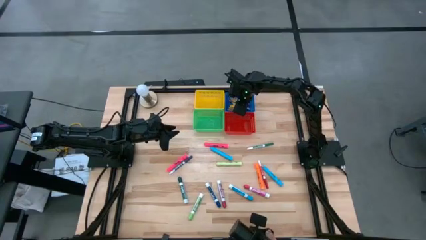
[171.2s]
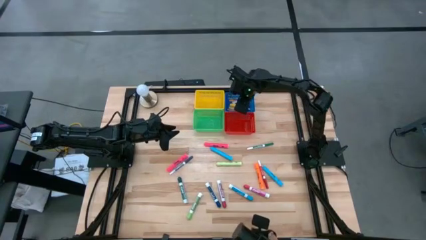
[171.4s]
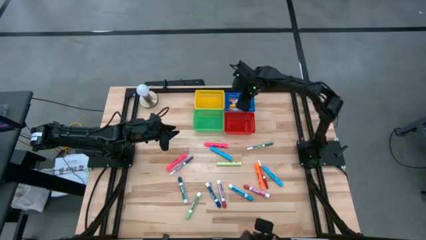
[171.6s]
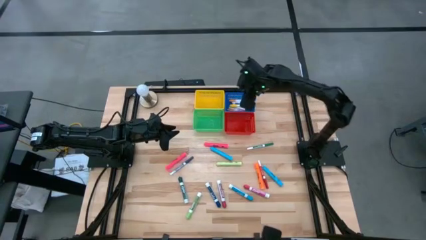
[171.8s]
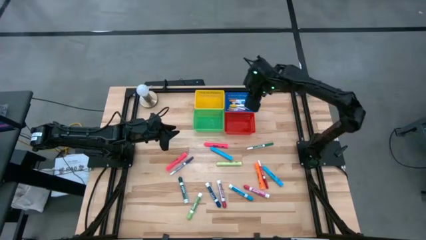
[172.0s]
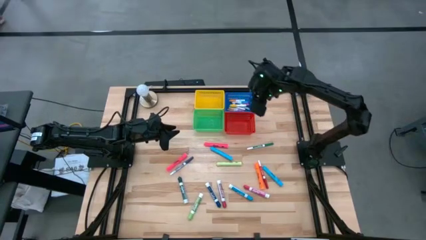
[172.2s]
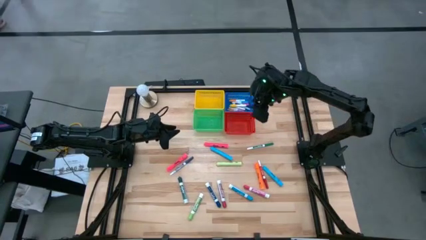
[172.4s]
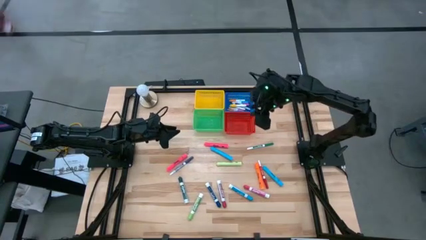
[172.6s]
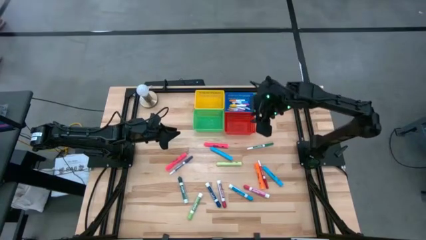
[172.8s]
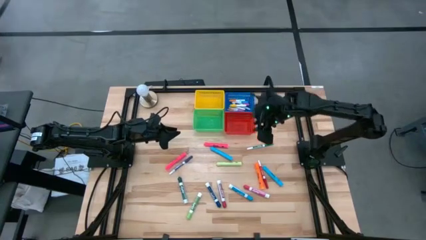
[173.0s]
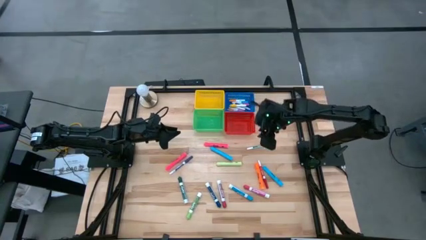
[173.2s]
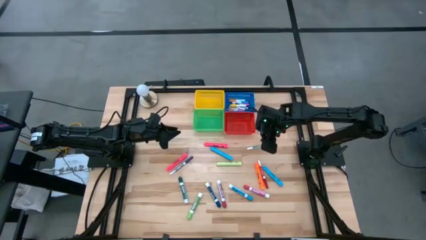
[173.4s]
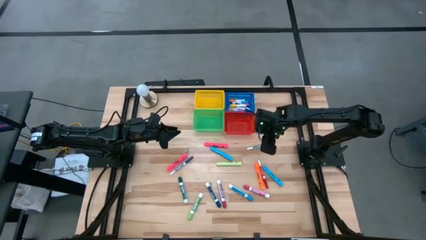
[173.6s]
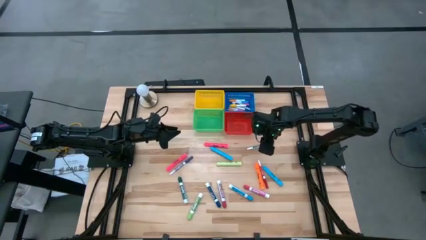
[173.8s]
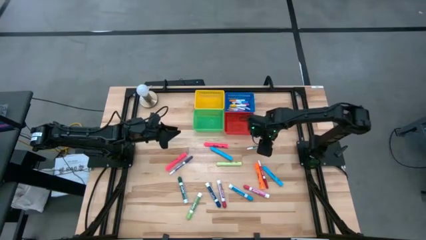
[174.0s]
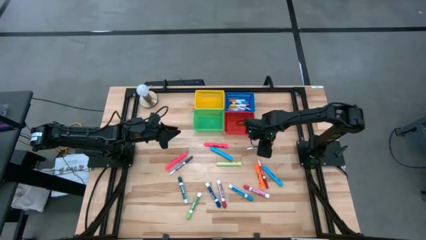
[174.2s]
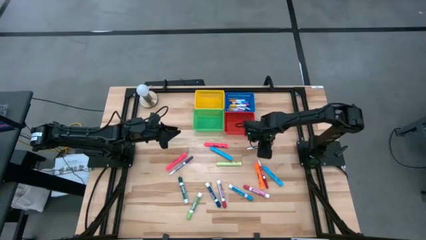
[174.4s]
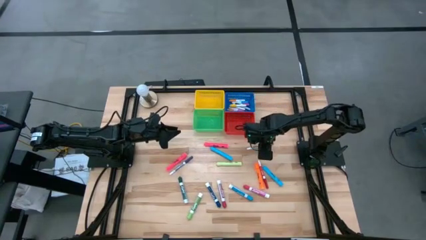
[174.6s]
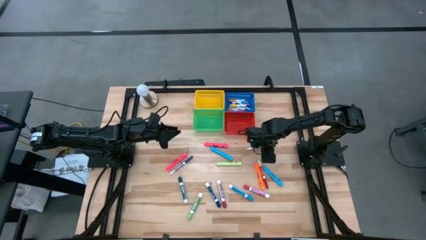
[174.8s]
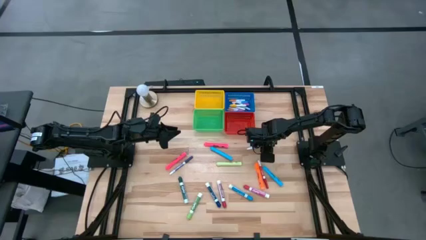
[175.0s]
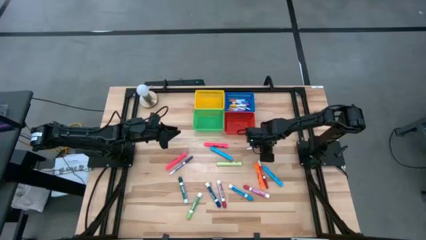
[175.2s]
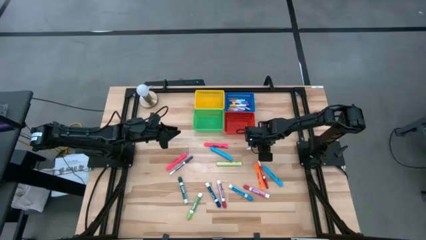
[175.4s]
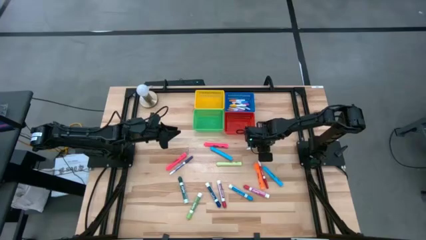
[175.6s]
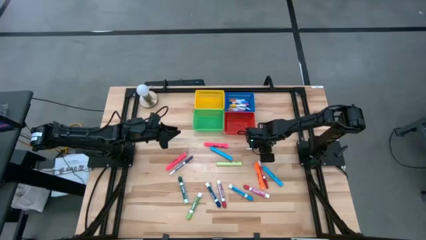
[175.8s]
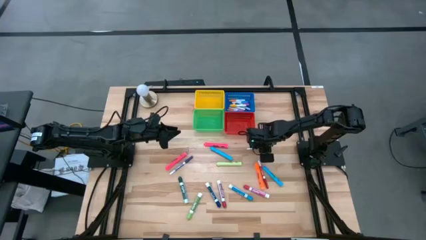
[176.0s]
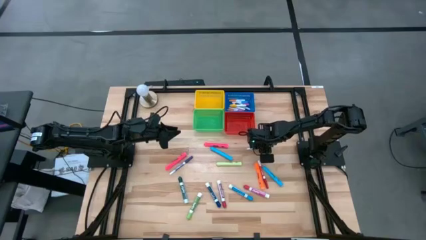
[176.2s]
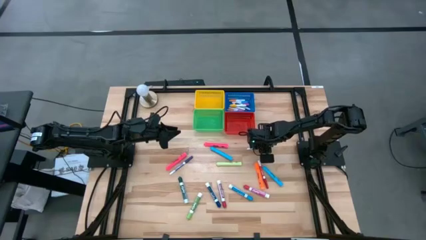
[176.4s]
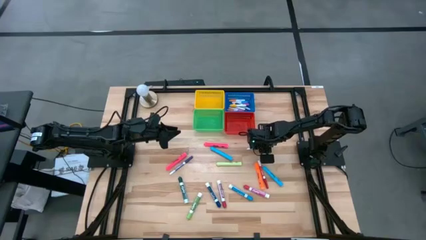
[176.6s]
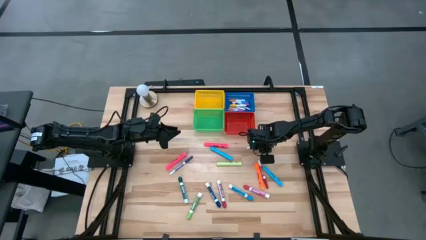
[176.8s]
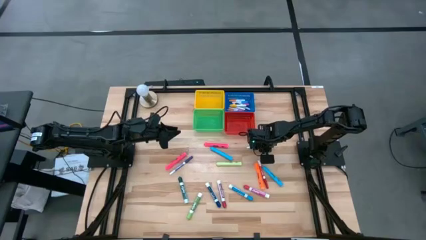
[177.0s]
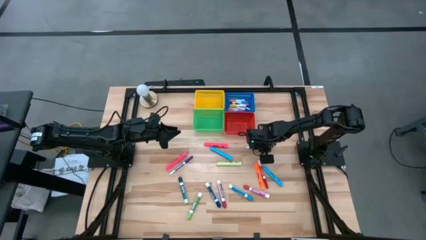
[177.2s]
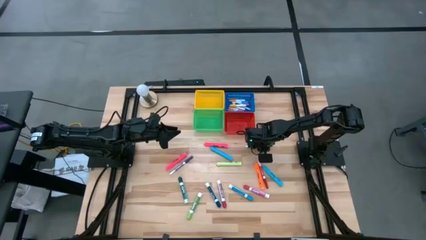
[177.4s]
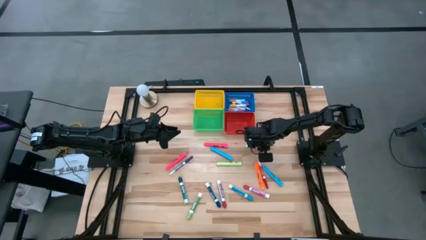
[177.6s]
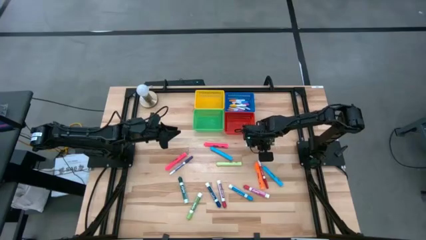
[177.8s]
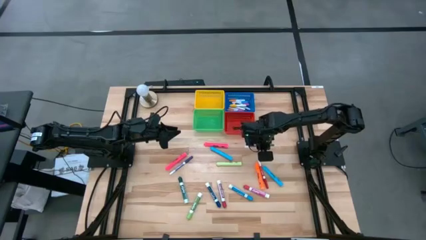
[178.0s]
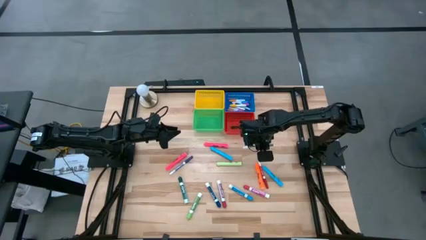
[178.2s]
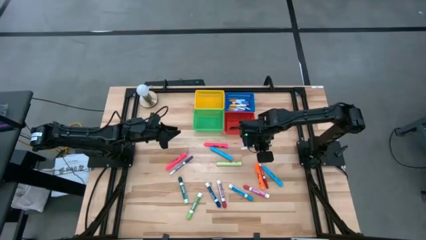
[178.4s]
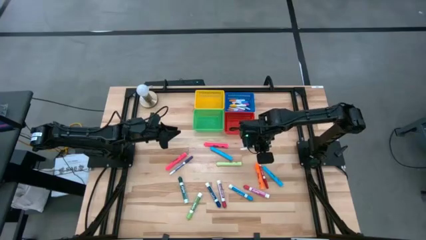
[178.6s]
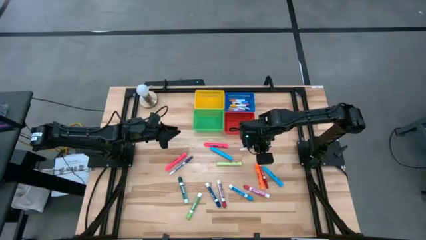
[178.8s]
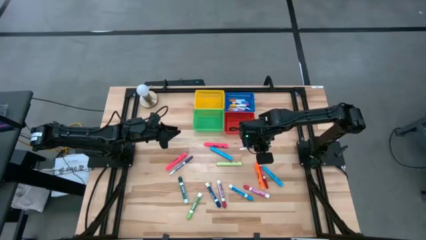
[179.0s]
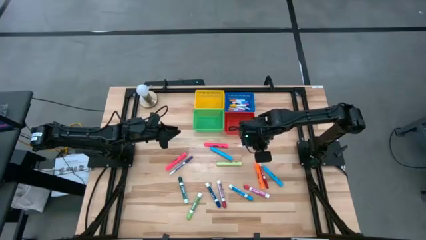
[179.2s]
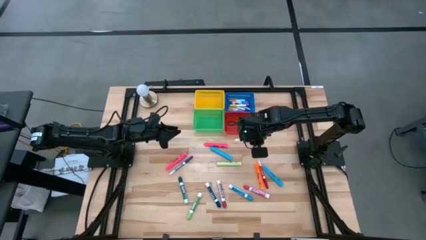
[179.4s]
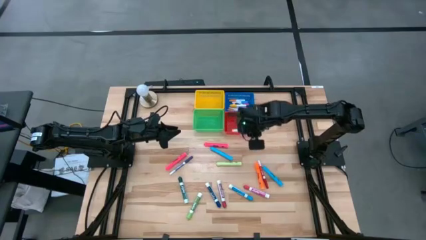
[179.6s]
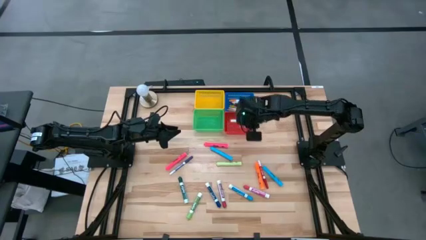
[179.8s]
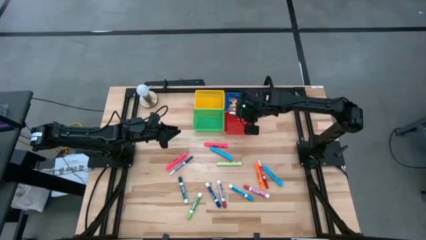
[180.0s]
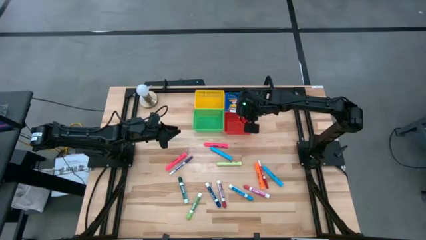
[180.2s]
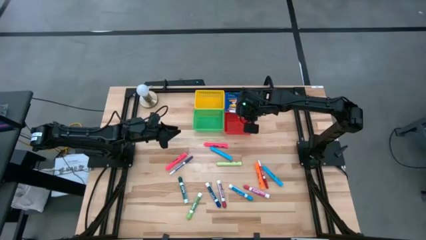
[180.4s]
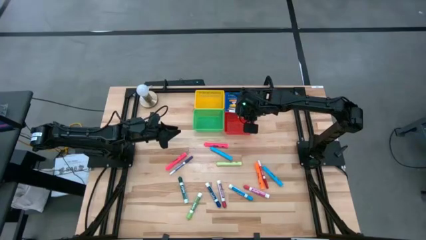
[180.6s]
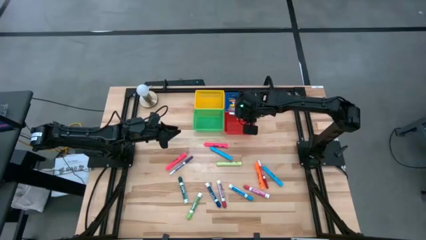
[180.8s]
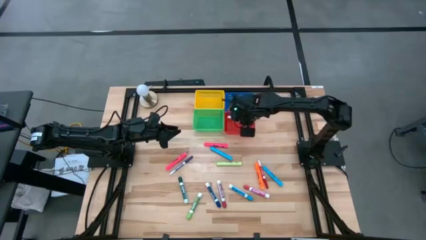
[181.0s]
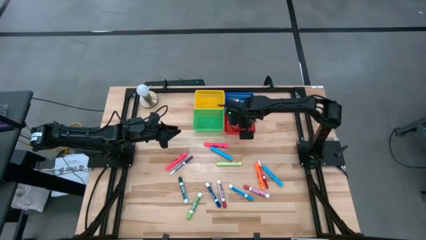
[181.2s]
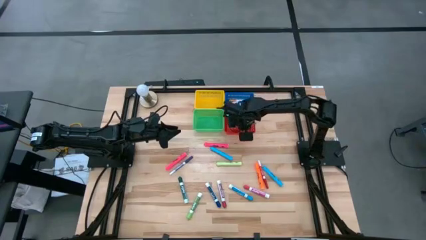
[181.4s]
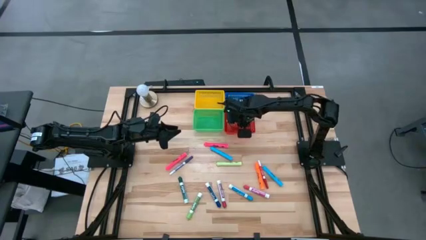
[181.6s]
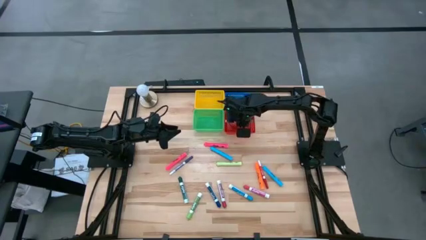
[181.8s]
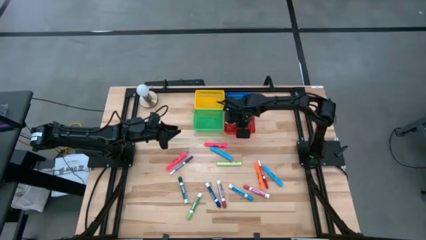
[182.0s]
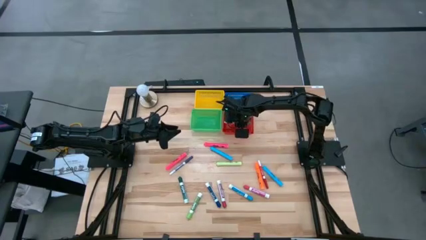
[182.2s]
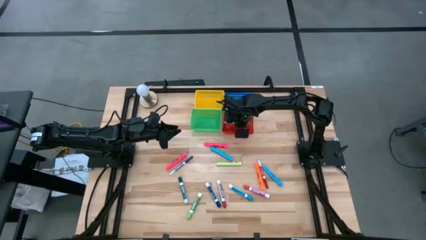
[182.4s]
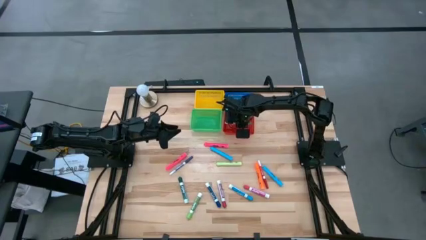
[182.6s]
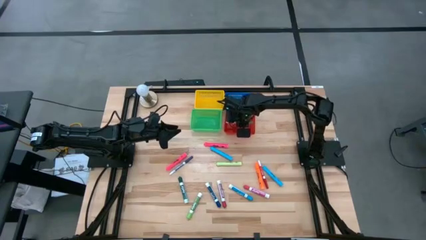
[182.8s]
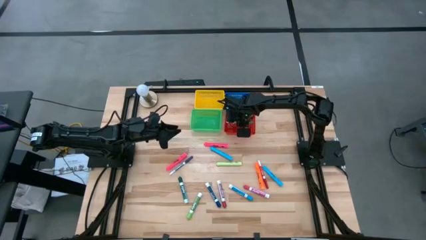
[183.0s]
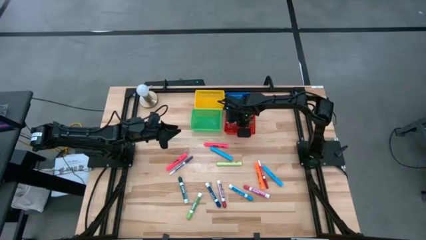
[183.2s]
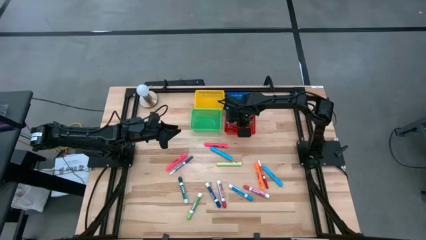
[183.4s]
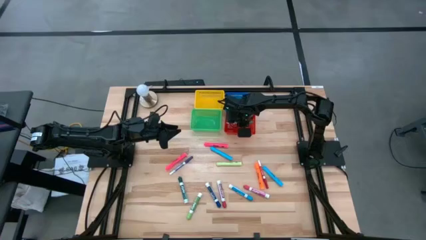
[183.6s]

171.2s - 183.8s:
Task: Pick & Place Markers
Put the small green marker pen into the red bin
